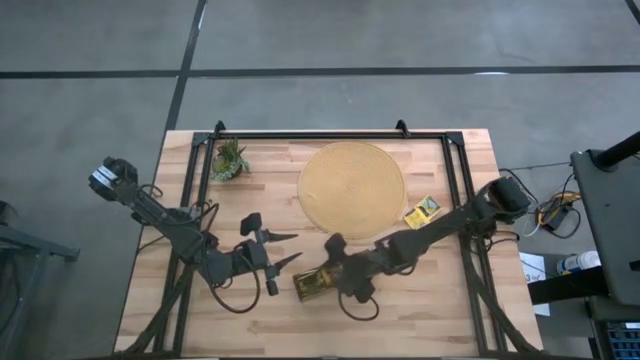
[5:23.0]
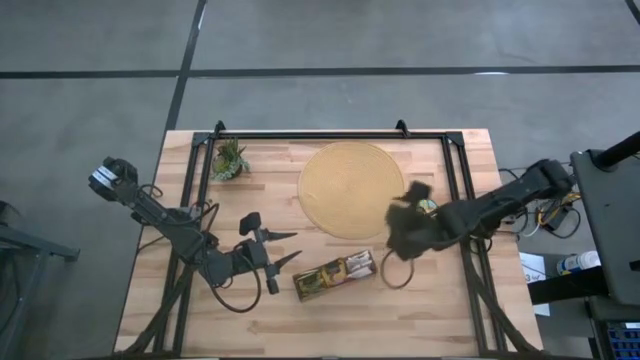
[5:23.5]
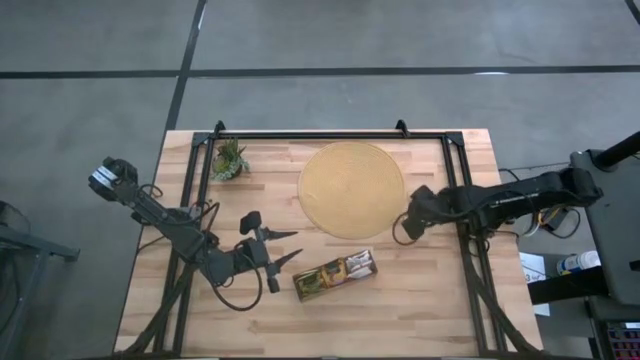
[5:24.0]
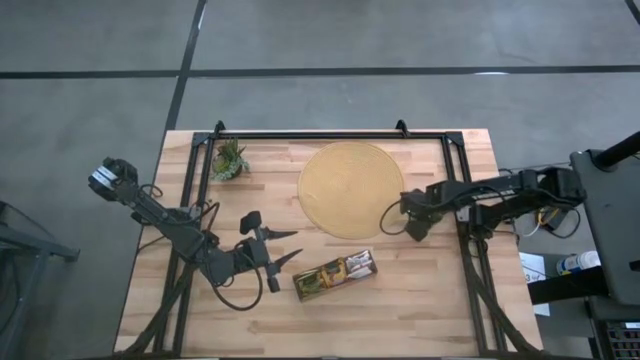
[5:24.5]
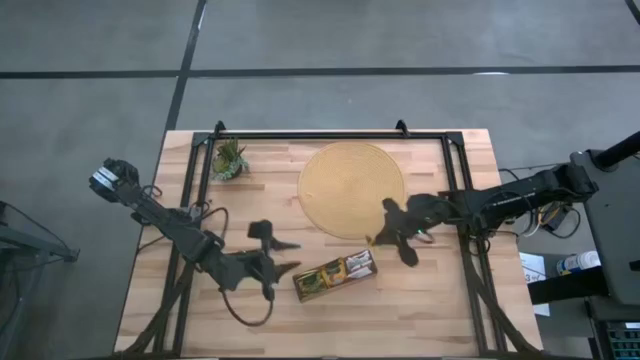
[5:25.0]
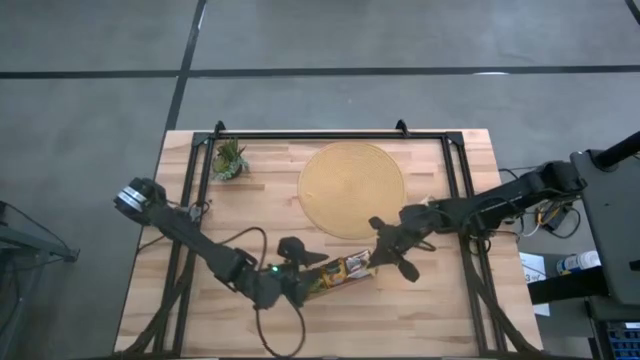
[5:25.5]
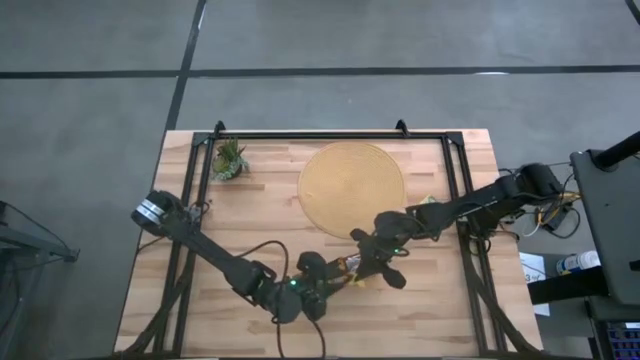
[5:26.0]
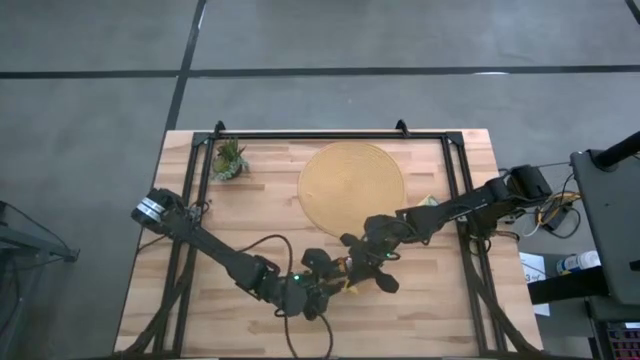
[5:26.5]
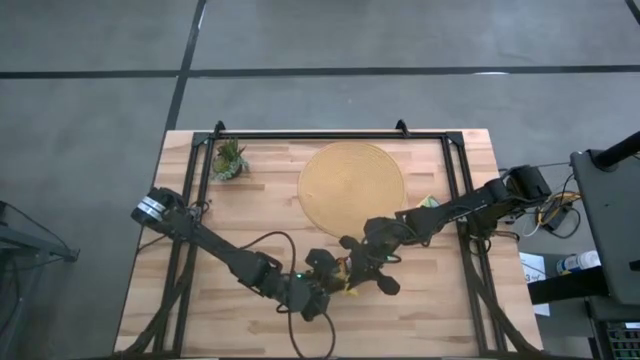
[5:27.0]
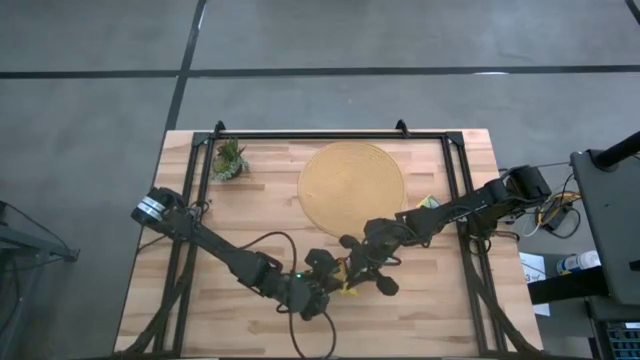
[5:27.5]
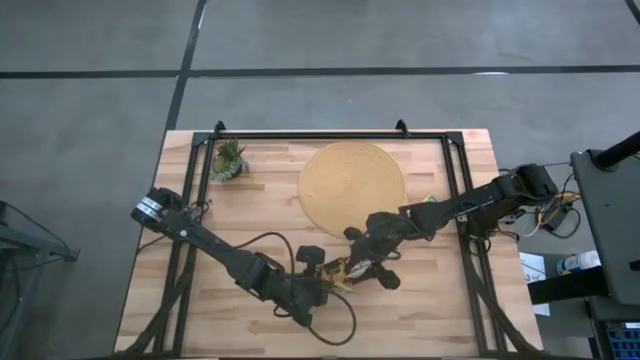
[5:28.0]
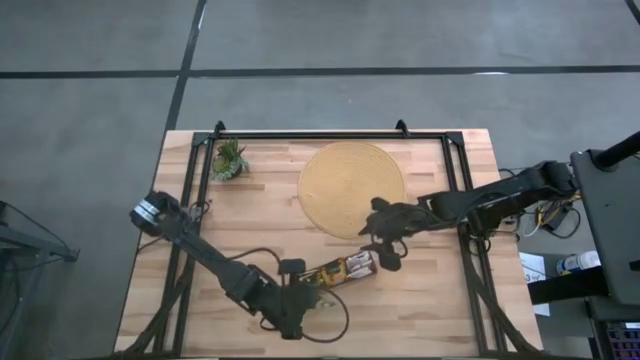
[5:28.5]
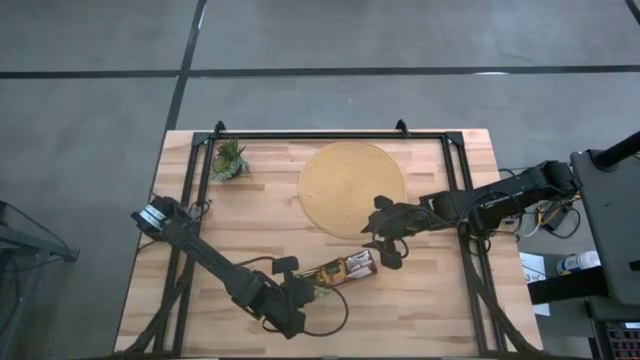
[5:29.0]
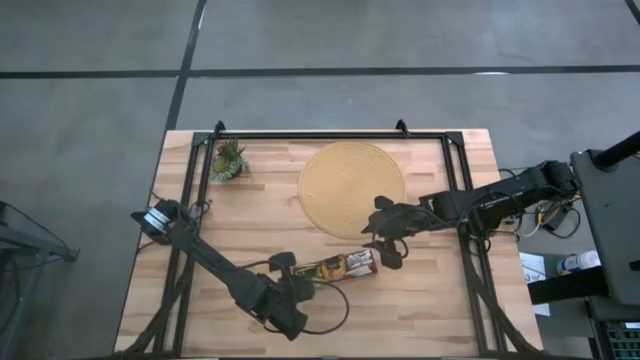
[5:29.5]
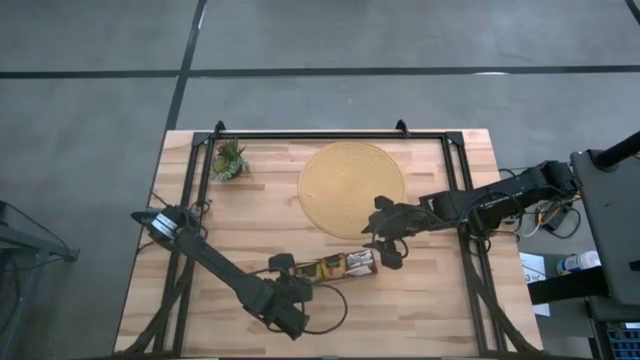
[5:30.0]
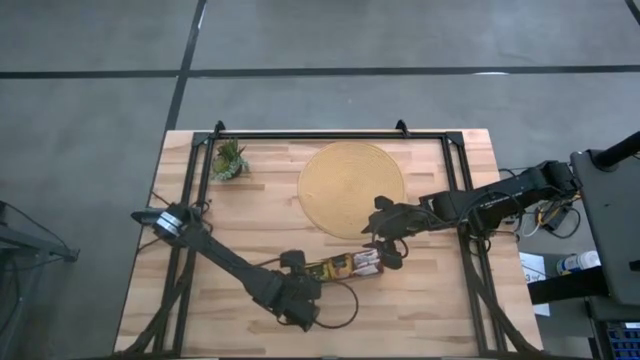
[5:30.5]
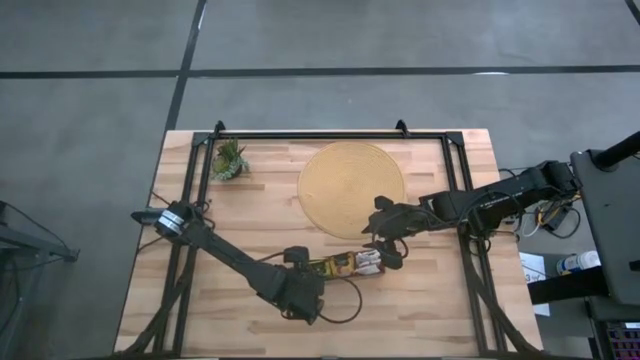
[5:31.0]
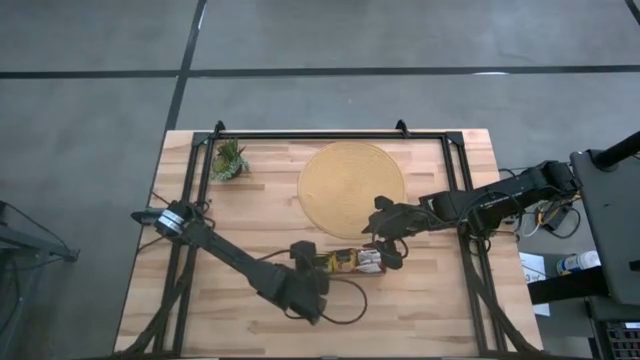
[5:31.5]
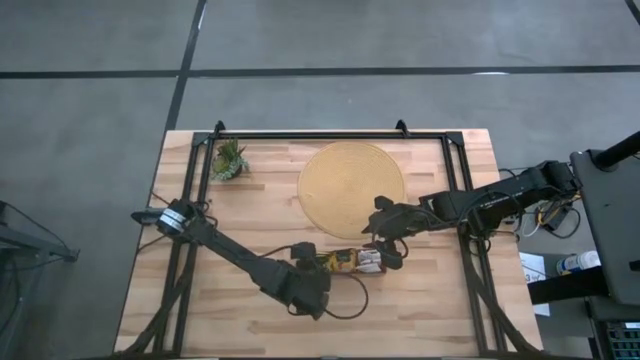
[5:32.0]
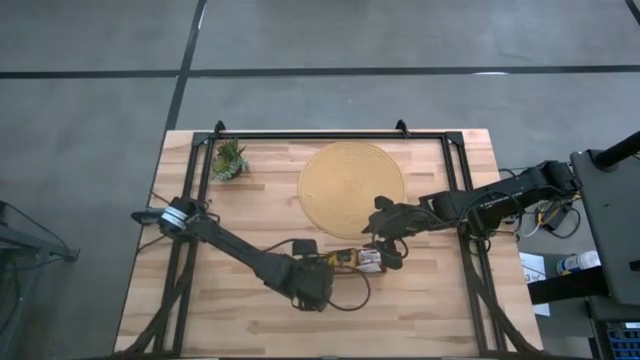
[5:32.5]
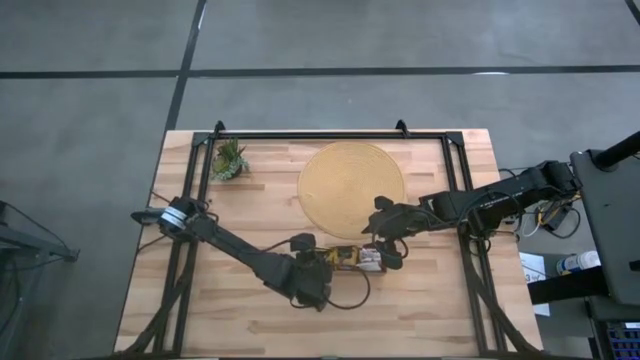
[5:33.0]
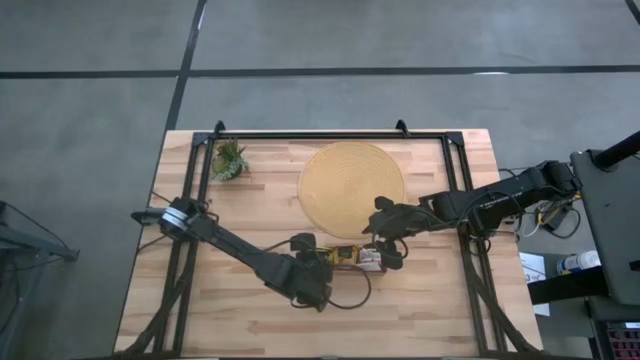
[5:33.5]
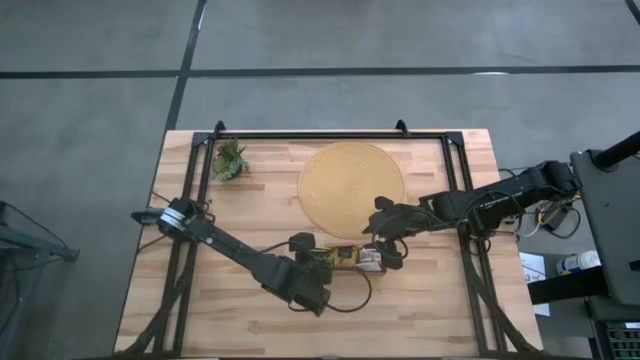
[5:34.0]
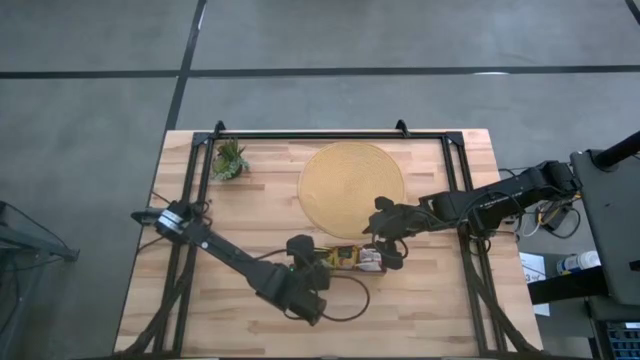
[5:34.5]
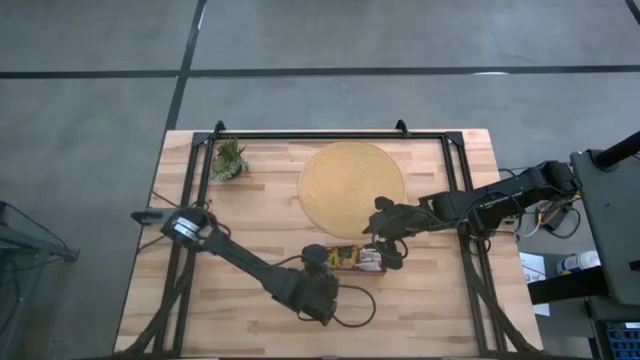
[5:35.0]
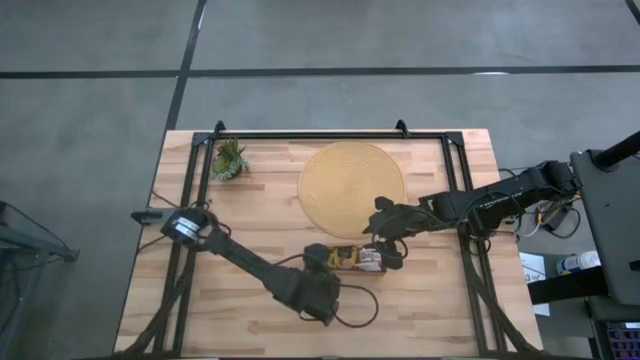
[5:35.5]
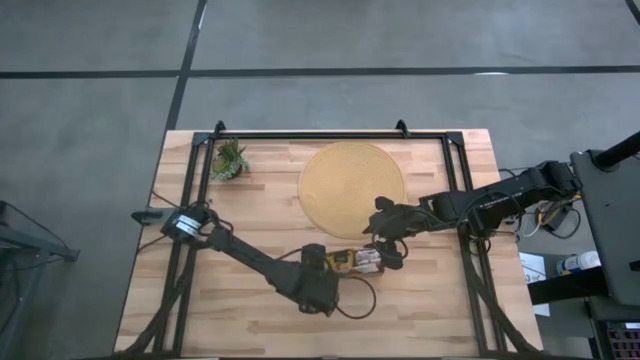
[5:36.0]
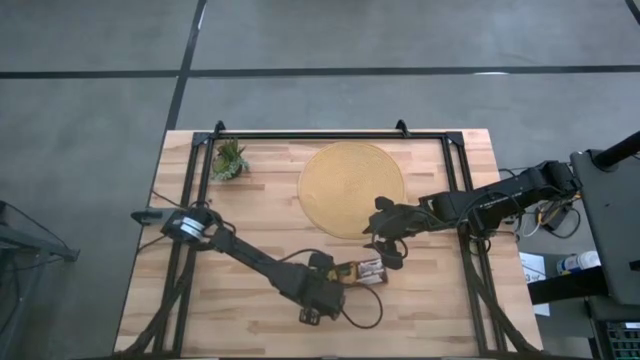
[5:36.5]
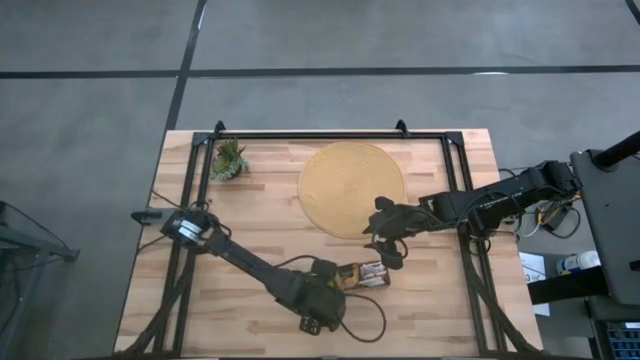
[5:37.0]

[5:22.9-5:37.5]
Task: Pick & Place Tea
Put the yellow tea bag into the left section of the wooden organizer
